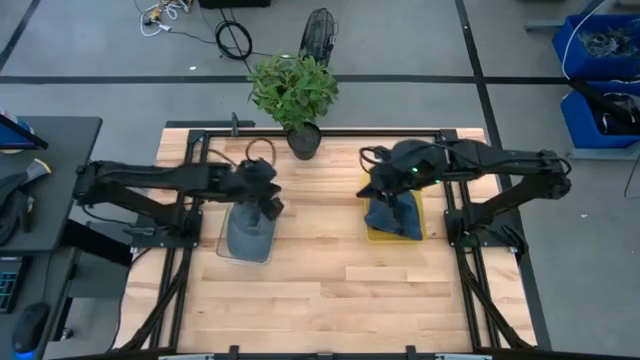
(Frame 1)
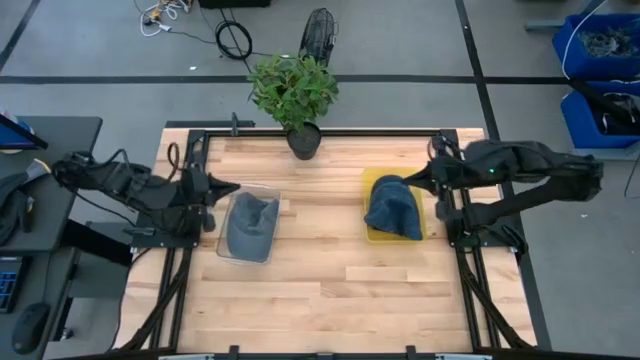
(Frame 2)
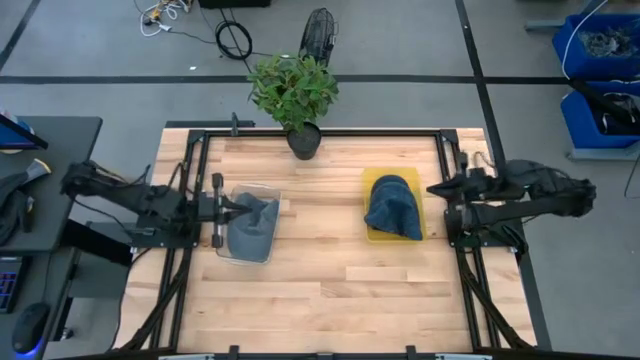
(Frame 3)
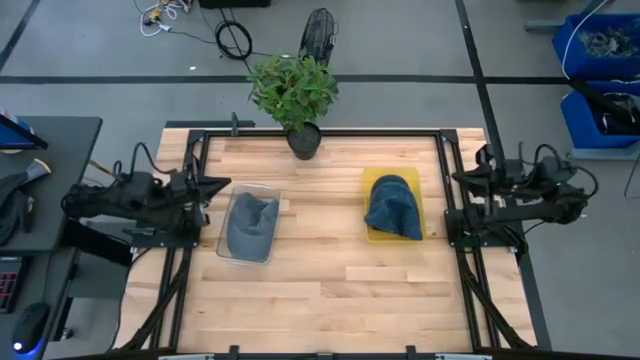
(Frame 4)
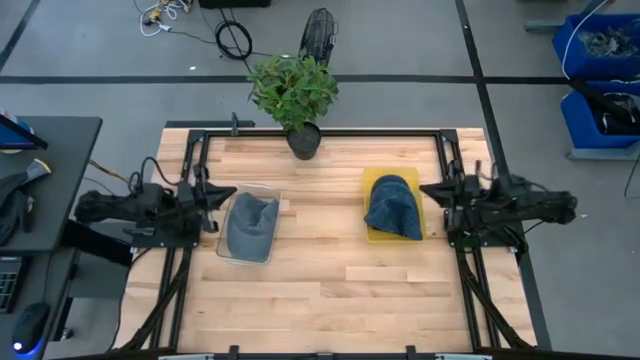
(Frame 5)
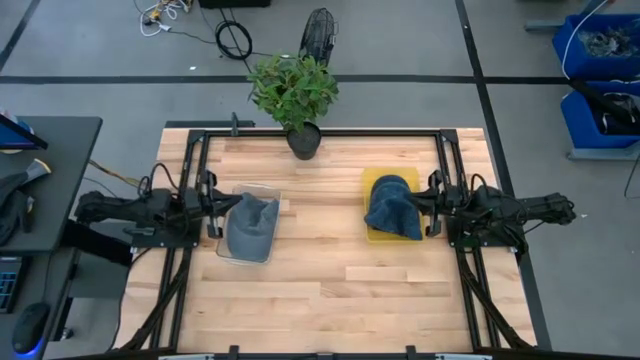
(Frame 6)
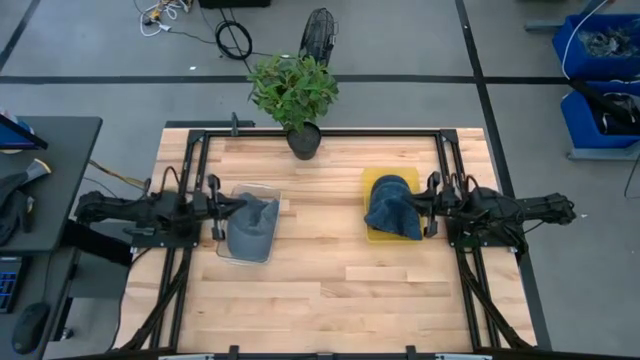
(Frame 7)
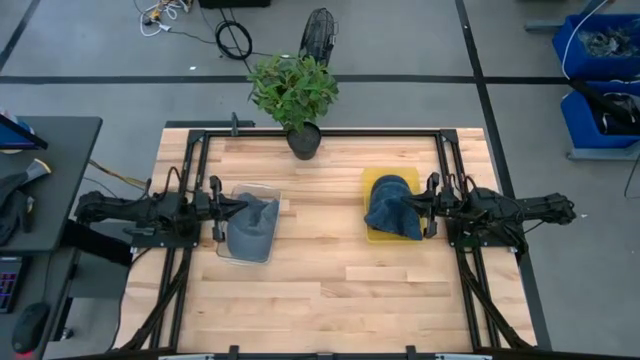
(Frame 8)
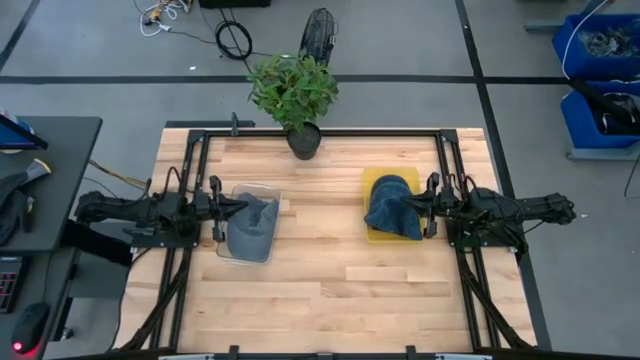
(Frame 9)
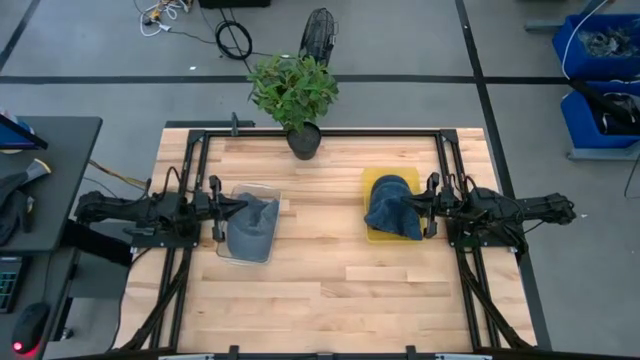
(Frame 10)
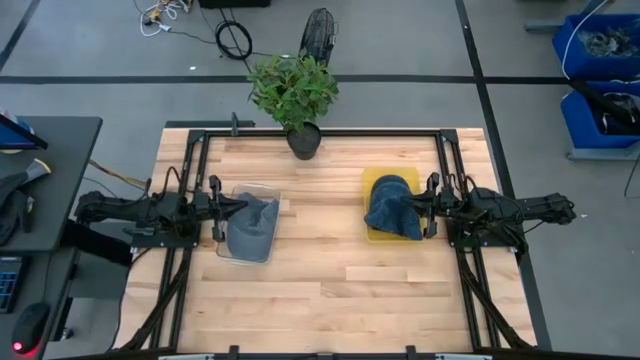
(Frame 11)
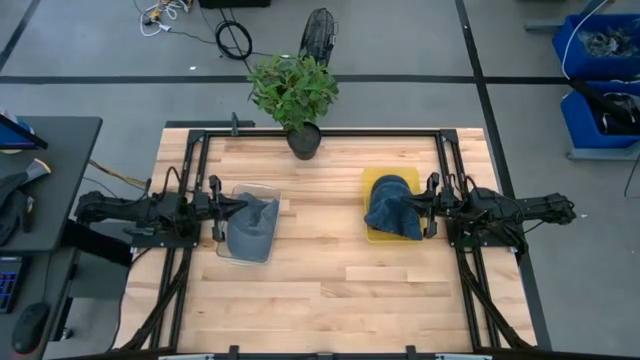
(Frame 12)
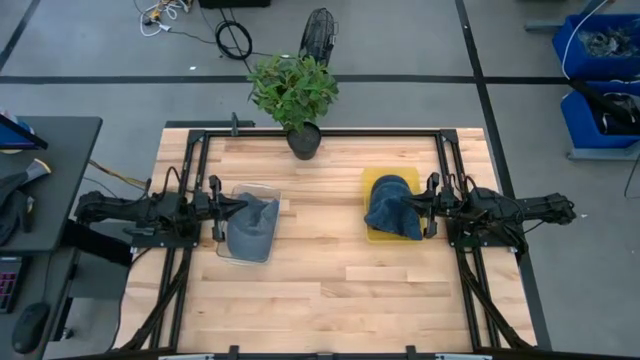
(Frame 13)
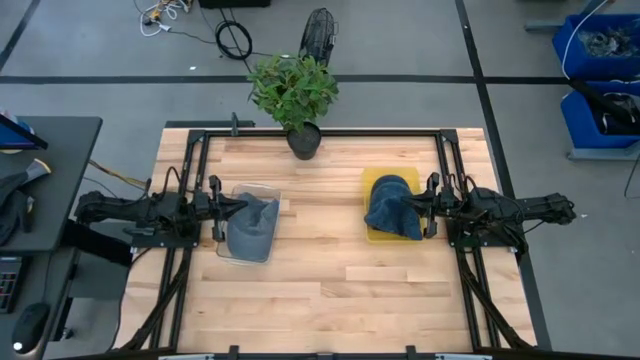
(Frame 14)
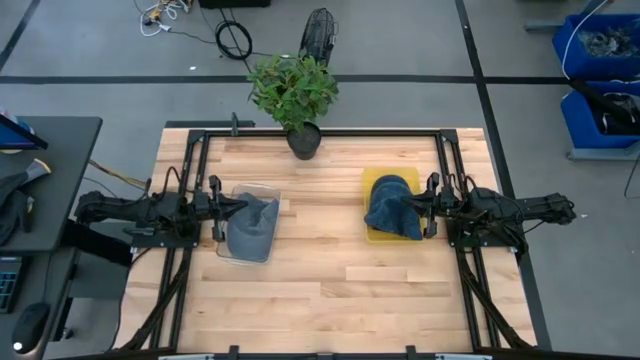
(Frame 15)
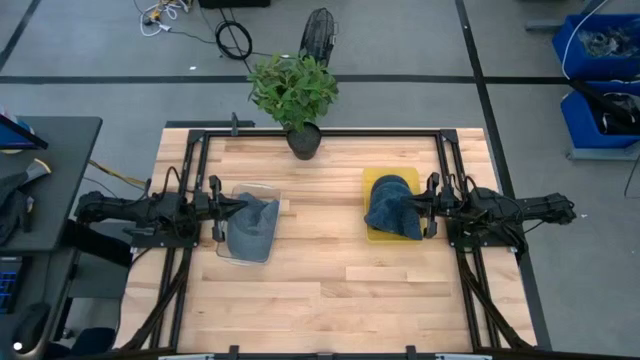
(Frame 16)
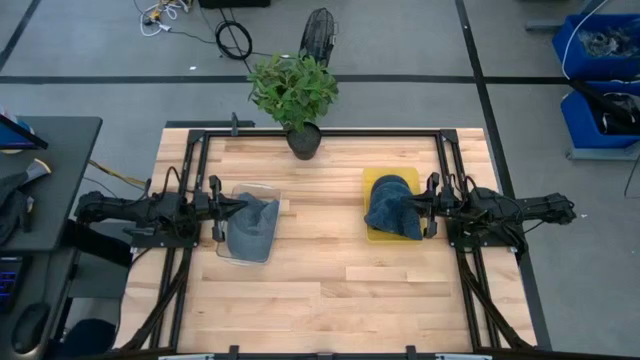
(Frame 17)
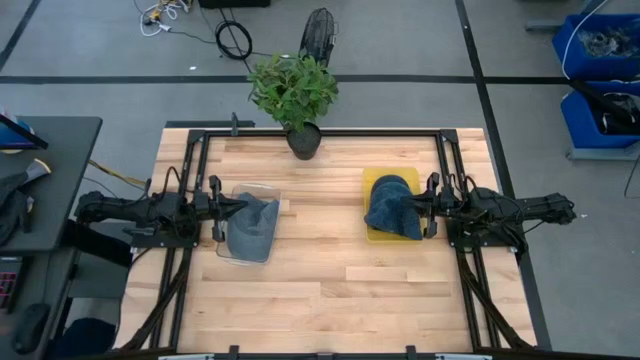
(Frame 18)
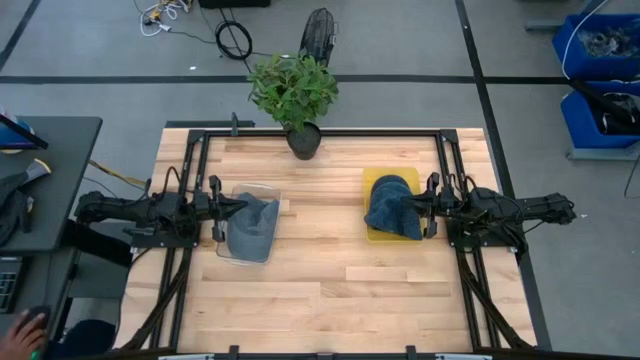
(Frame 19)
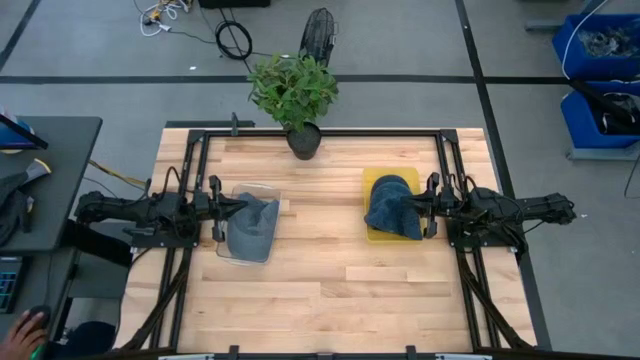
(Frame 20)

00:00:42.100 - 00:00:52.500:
Task: Pick & Place hat
Return to Home Position

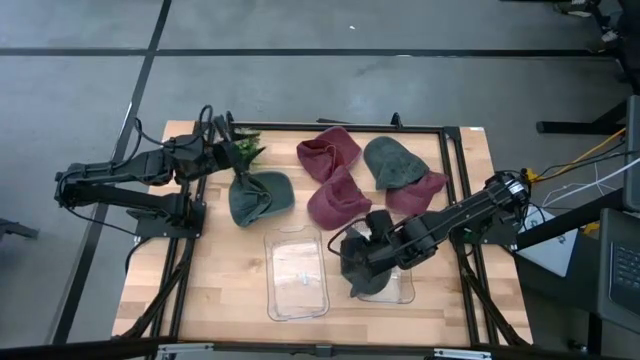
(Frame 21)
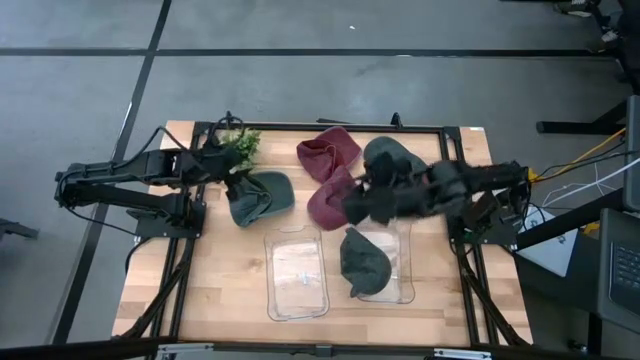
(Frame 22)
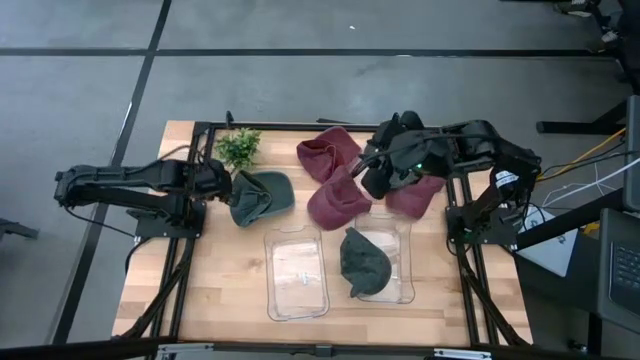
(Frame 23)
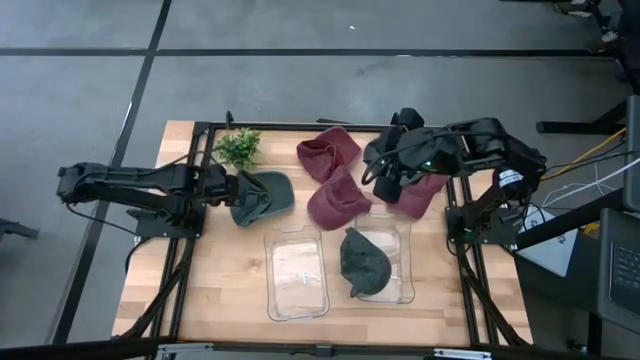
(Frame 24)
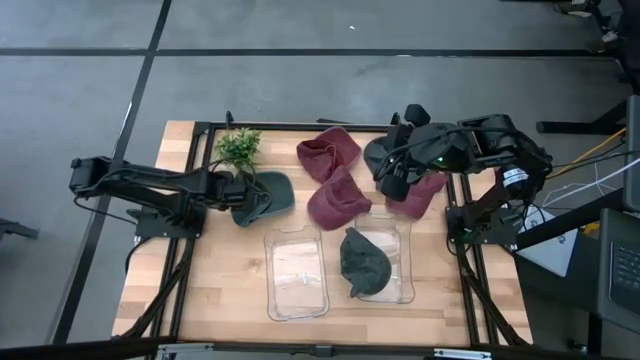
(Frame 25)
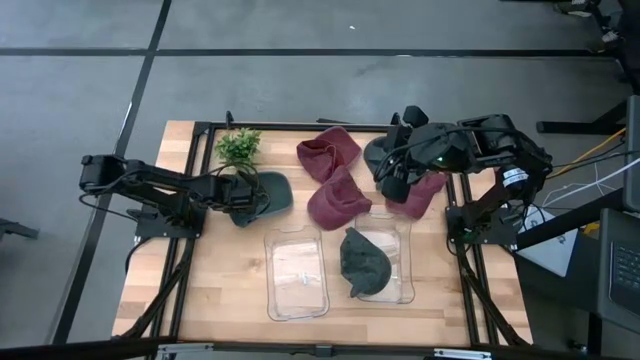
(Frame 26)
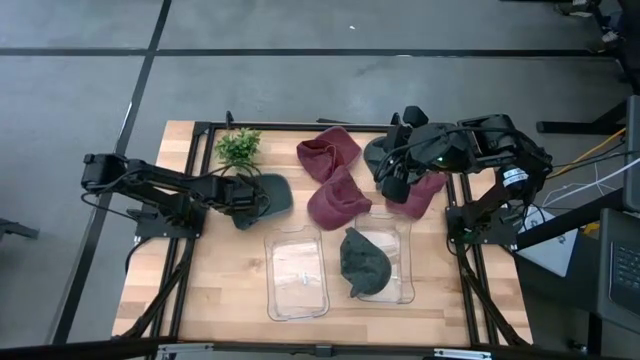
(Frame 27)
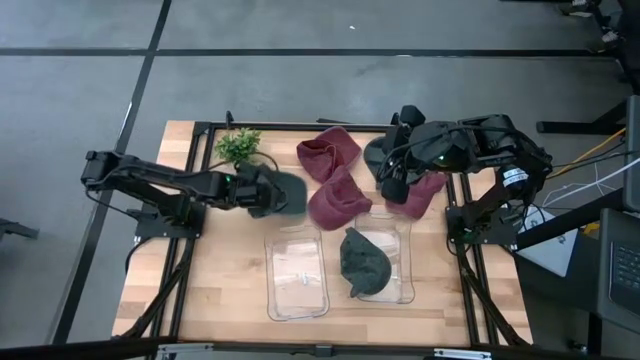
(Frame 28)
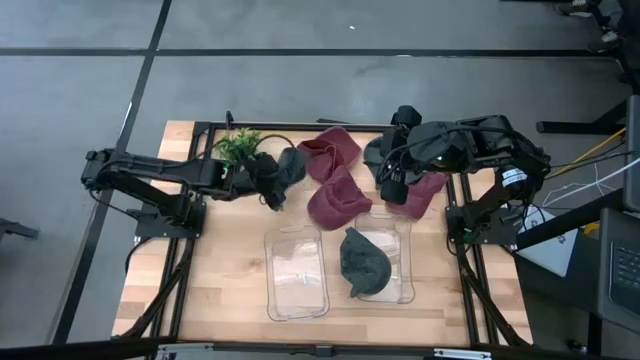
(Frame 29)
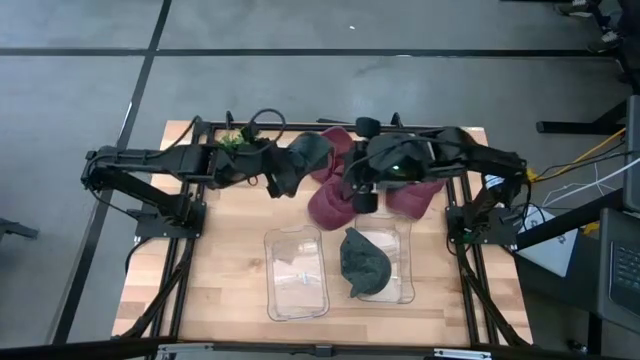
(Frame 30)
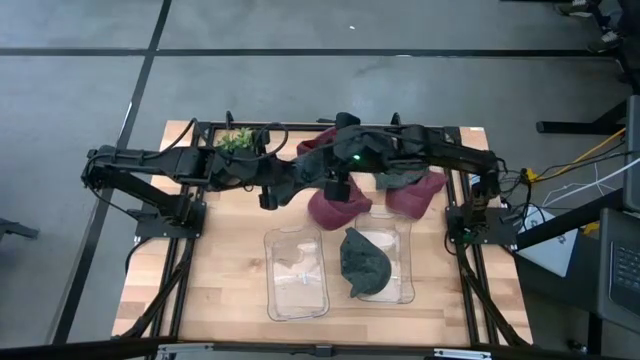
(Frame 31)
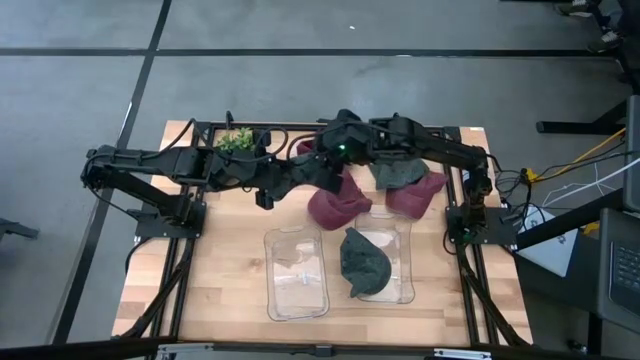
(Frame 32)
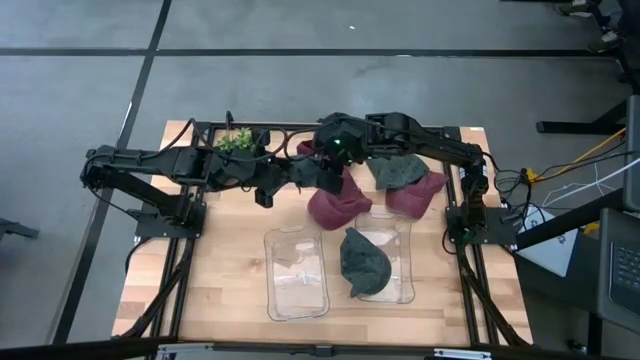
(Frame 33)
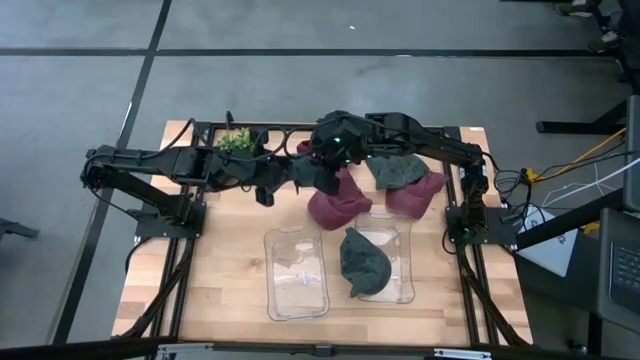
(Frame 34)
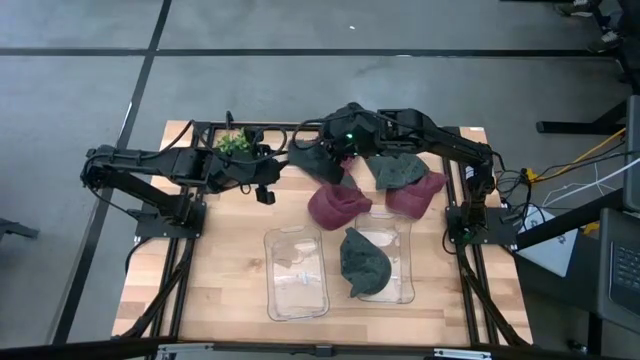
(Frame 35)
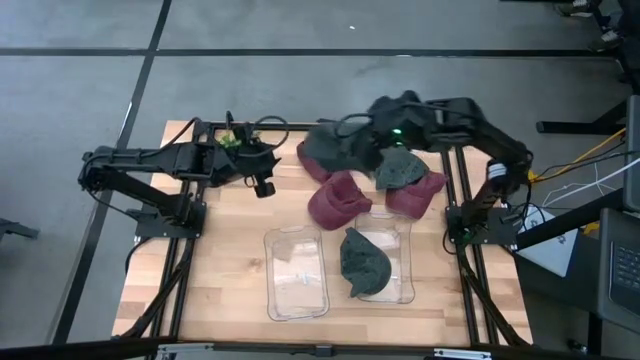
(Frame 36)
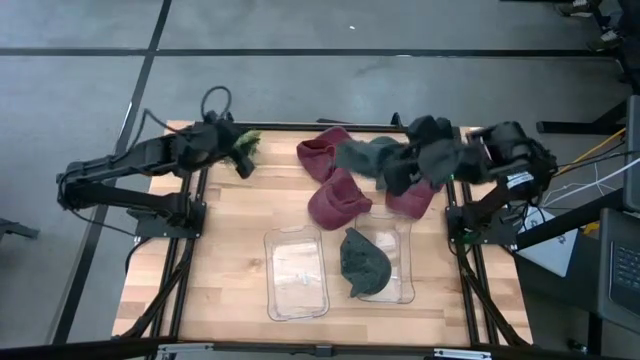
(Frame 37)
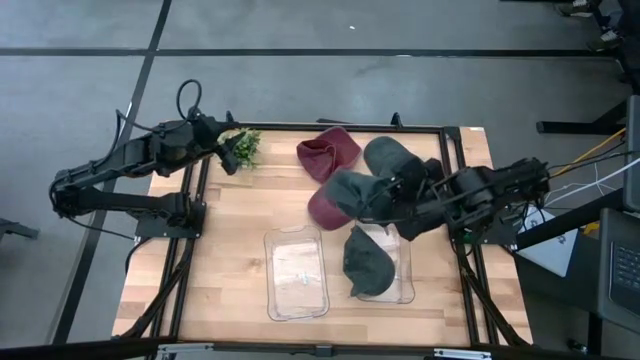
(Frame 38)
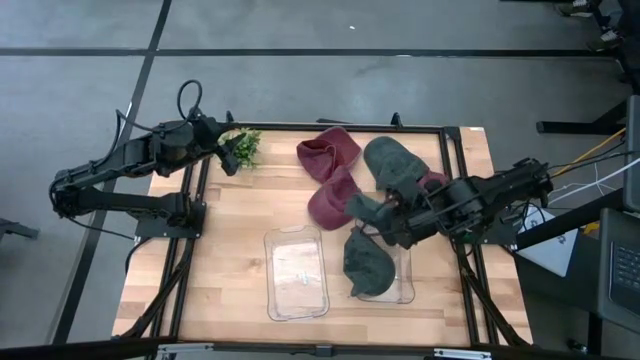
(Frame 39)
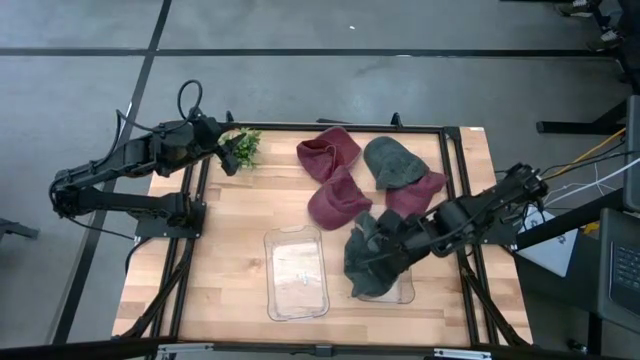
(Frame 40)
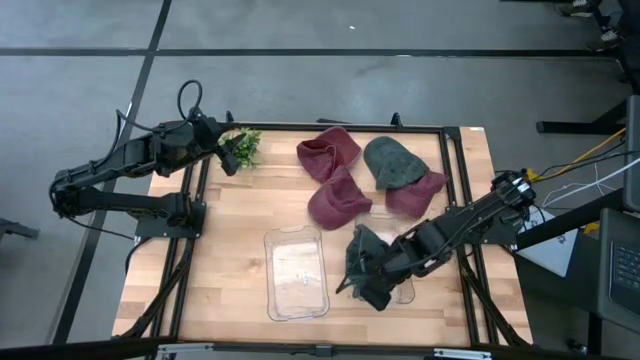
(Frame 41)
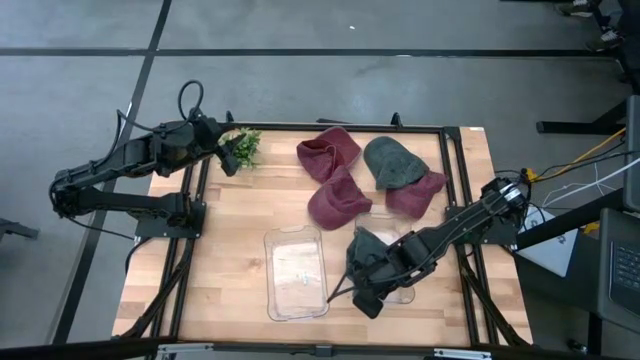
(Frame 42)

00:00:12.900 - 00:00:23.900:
Task: Pick & Place hat
Put the left black cap into the right transparent bin
